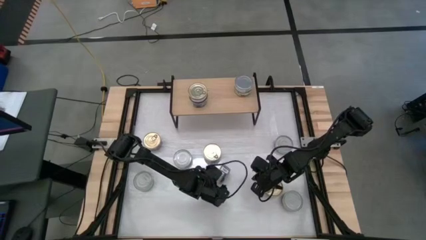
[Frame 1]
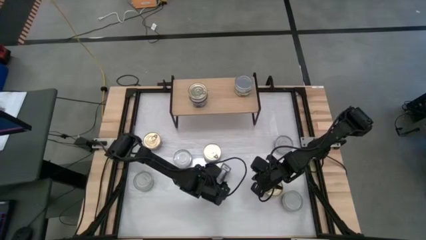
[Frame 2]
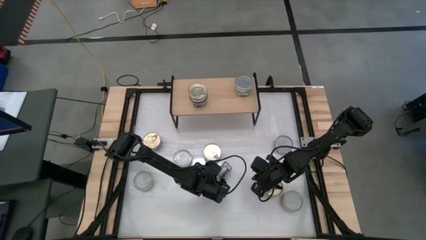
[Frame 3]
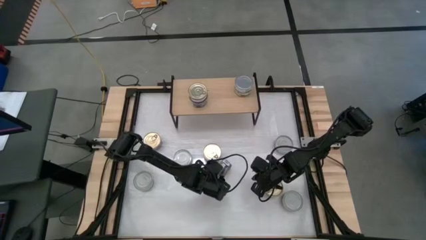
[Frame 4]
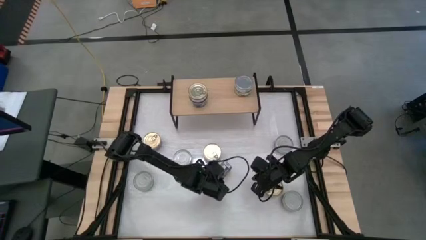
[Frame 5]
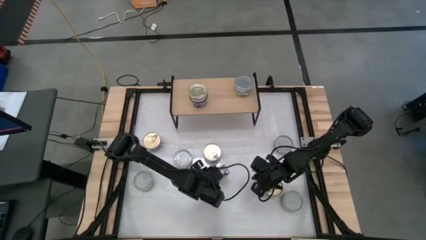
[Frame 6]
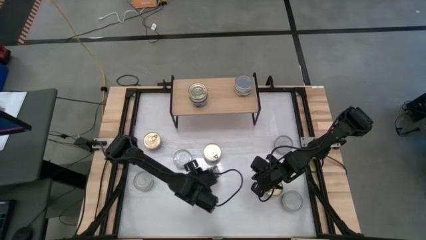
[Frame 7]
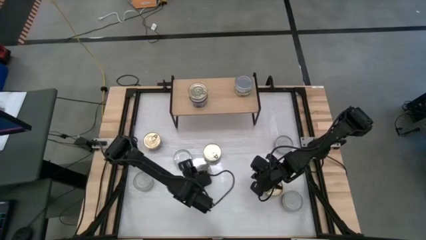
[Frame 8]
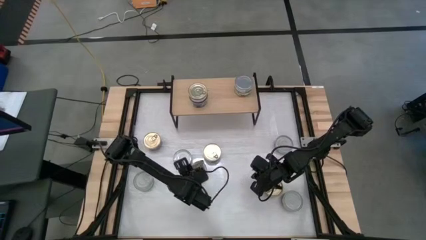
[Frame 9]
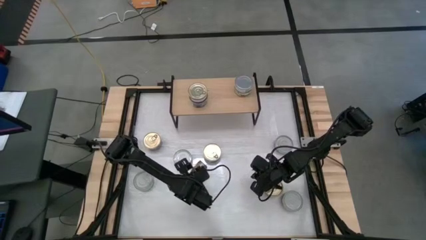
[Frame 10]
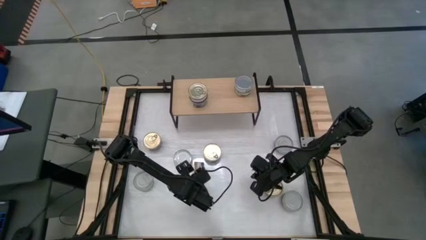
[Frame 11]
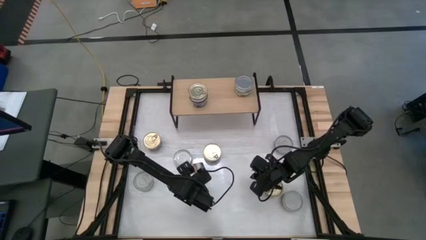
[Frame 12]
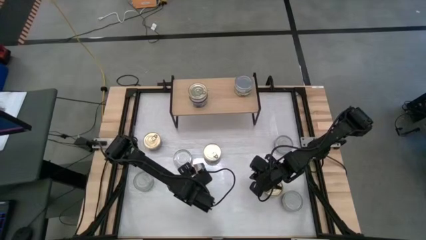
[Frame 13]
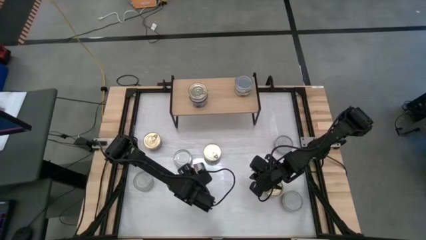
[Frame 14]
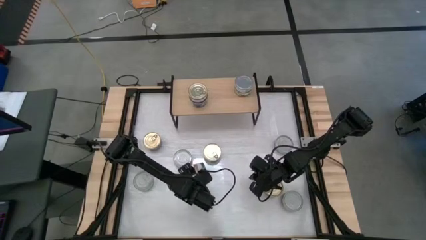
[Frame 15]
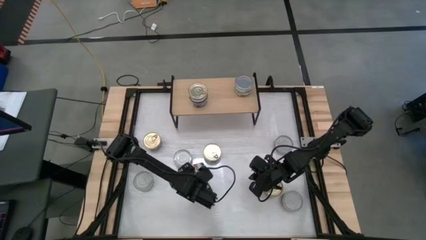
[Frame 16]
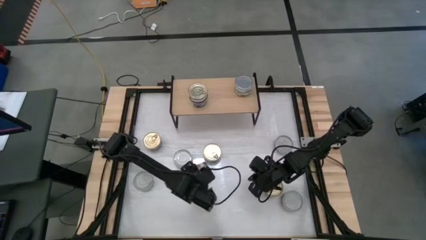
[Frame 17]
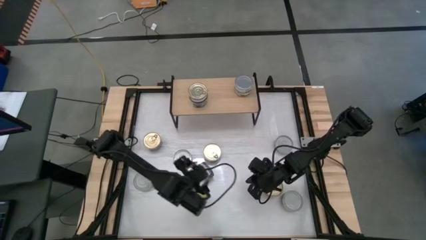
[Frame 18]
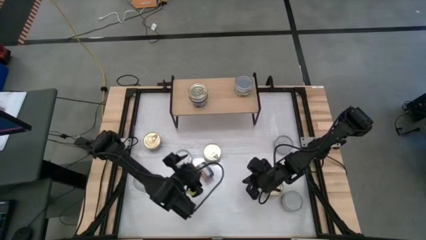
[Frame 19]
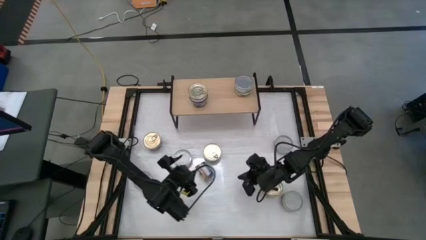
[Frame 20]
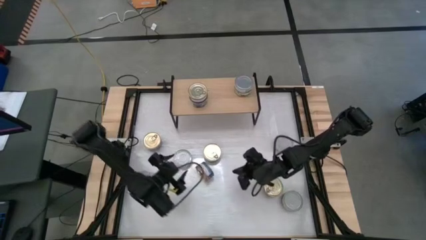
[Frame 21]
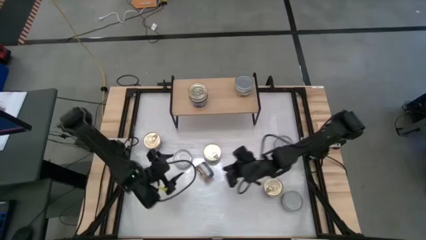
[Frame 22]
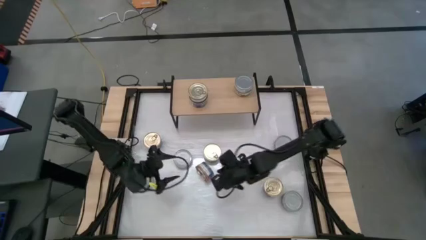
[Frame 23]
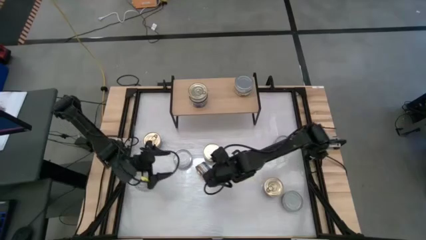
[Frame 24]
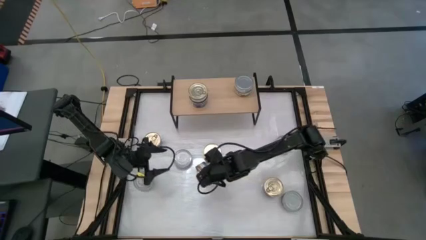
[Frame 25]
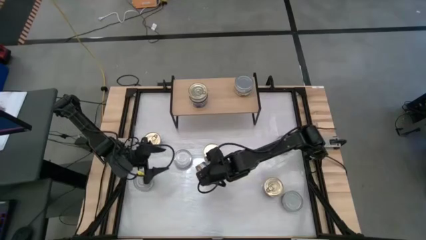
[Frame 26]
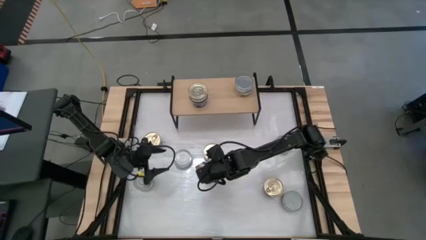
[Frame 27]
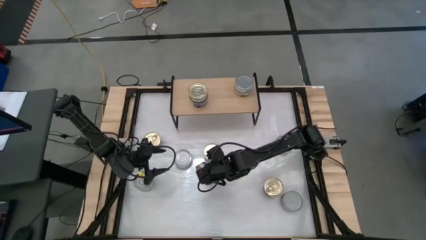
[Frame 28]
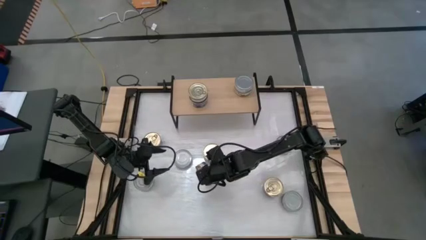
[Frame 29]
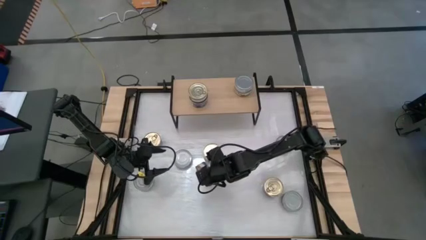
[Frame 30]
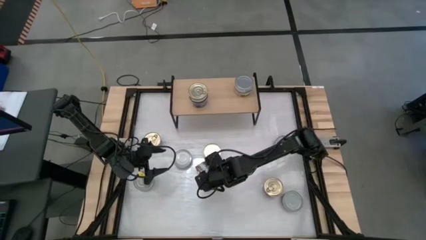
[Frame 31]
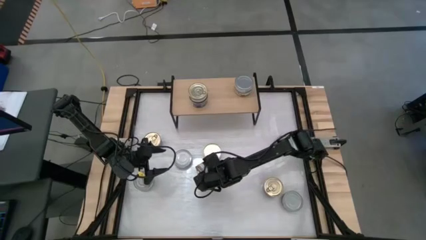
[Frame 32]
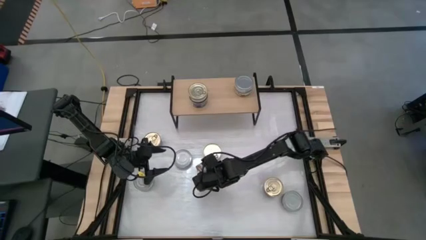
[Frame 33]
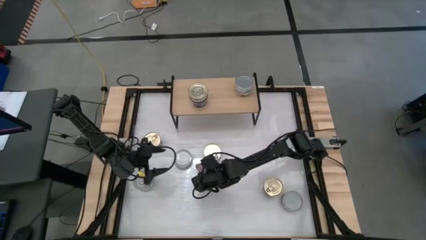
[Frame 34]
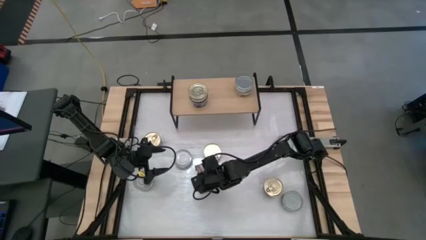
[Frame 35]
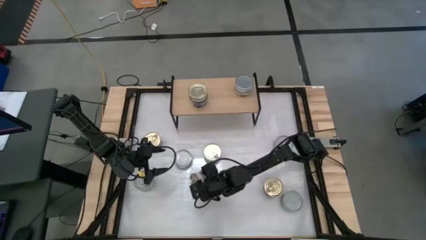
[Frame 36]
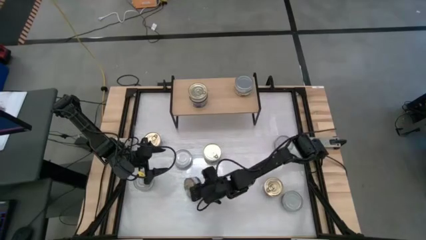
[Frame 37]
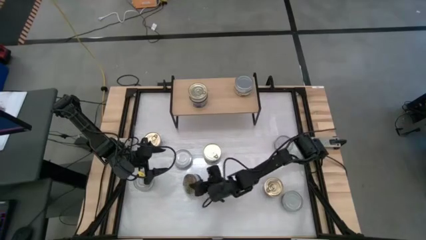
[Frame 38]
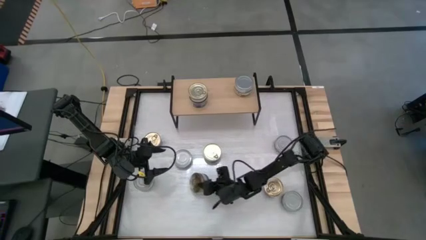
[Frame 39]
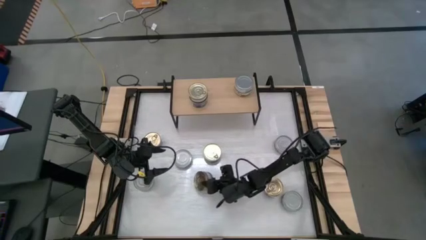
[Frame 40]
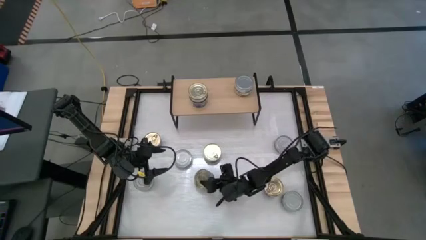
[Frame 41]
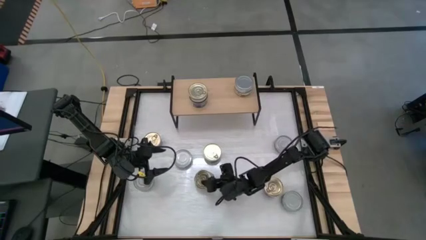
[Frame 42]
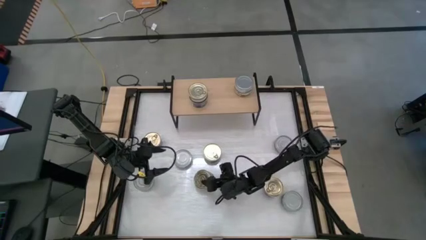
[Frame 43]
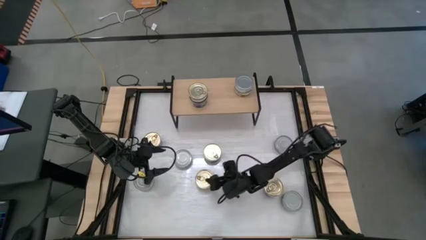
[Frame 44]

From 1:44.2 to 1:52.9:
Task: Stack canned seafood by type on shelf
Put the blue pink tuna can on the shelf

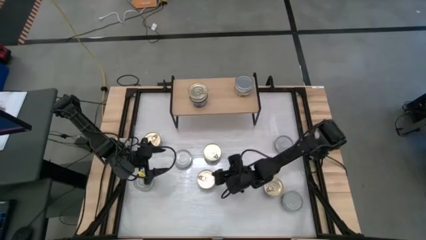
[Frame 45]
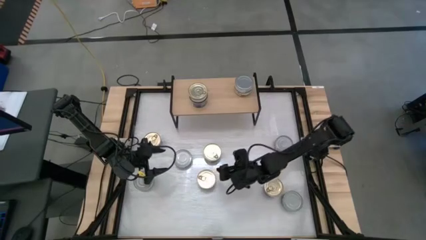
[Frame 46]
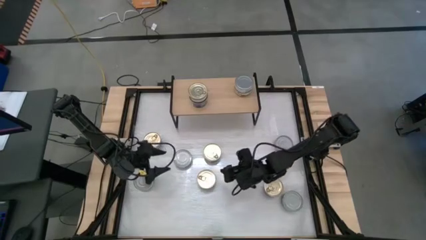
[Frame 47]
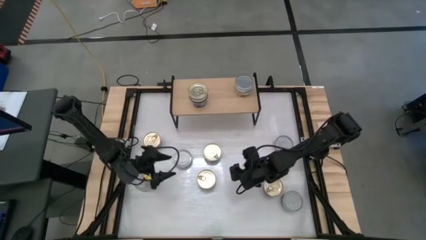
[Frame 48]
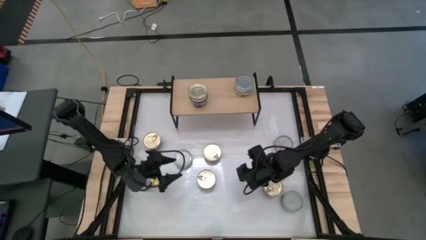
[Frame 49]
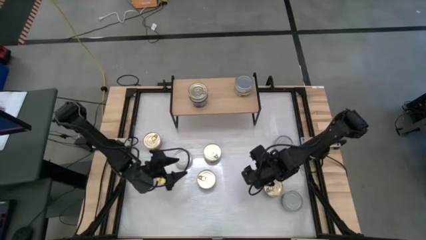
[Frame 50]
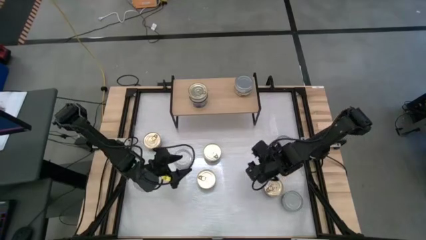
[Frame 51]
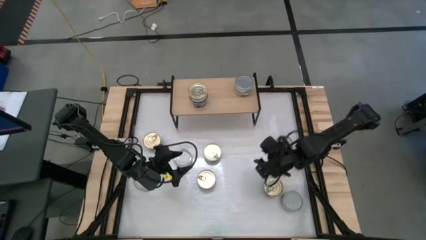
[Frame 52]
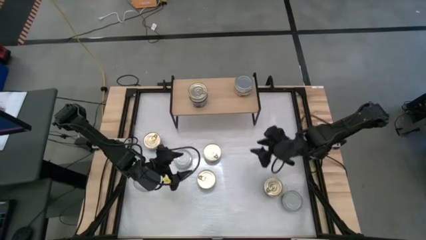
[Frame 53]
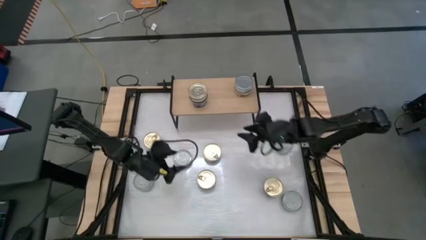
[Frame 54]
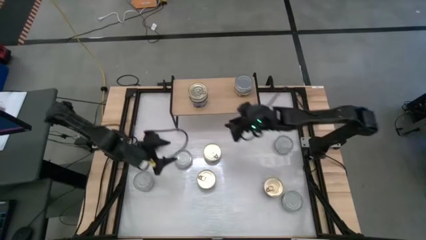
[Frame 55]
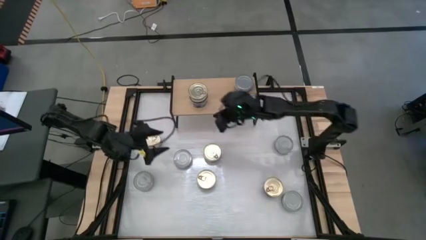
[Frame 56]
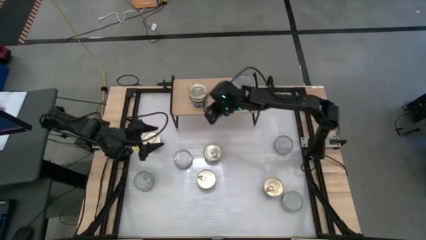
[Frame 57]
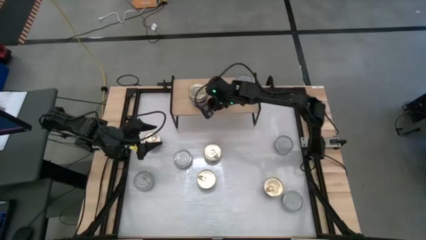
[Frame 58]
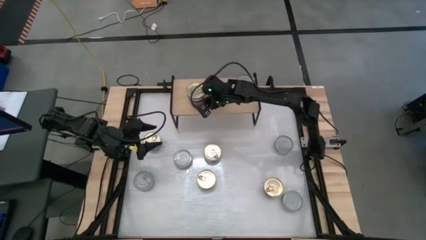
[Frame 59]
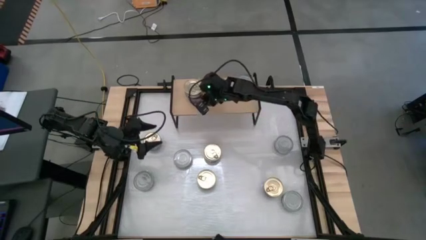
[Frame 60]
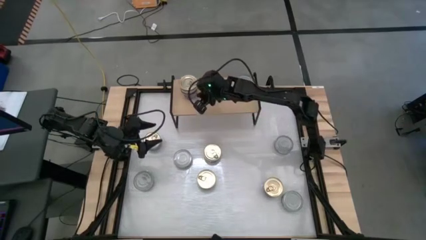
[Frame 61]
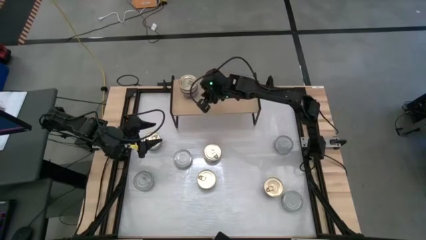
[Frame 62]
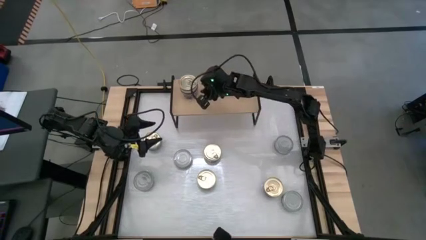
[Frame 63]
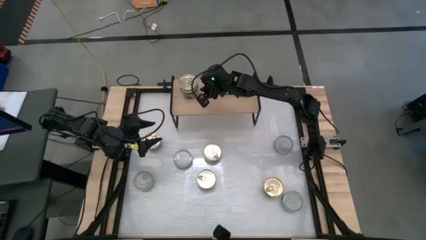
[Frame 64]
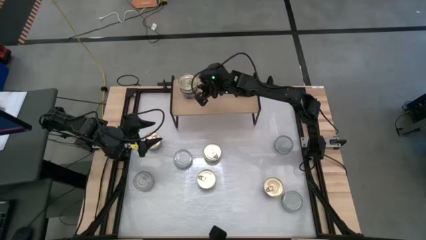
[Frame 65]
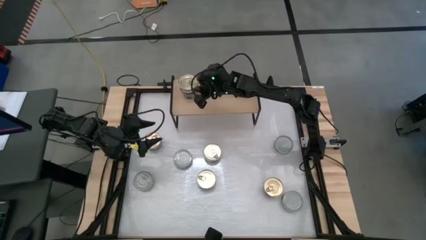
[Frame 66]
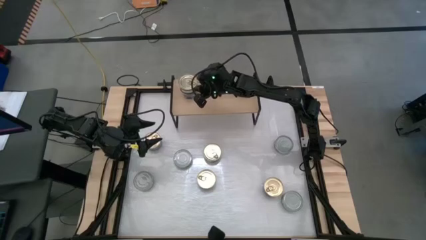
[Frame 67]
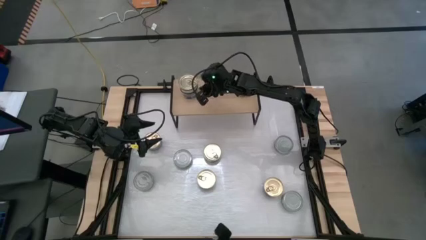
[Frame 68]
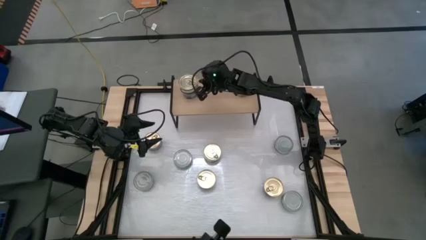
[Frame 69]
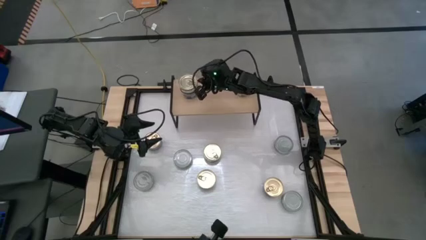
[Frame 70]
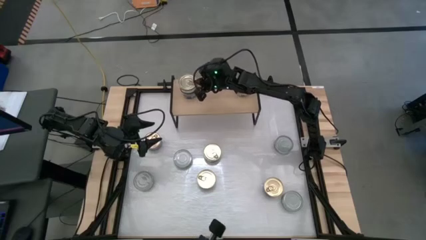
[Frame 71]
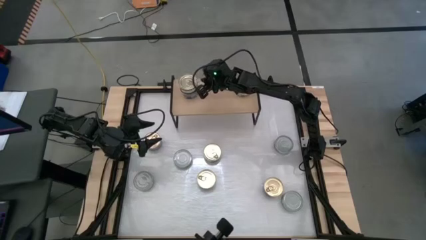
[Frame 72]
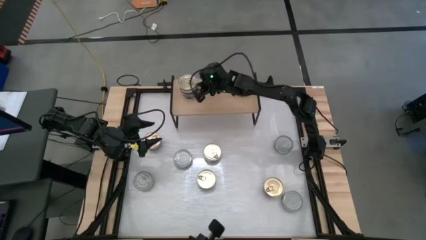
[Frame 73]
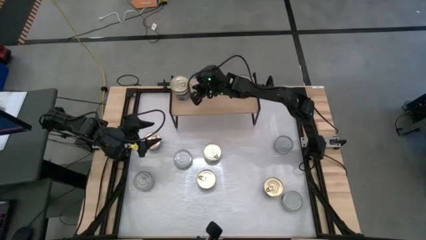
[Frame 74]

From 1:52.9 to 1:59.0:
Adjust the stacked blue pink tuna cans on the shelf
